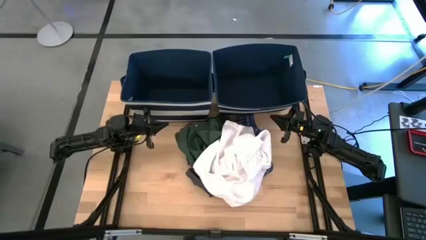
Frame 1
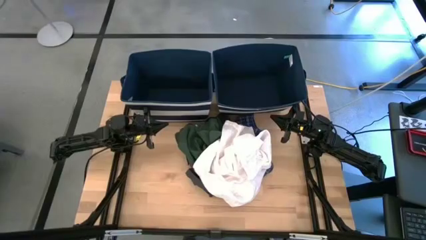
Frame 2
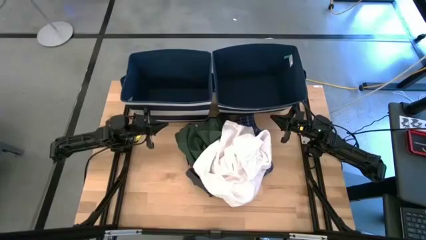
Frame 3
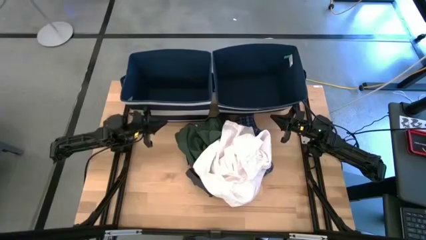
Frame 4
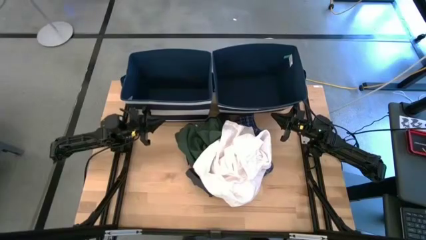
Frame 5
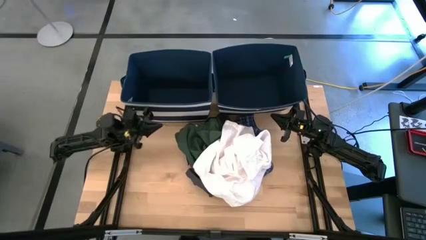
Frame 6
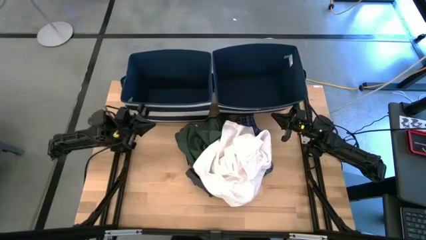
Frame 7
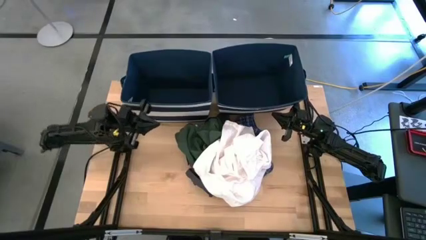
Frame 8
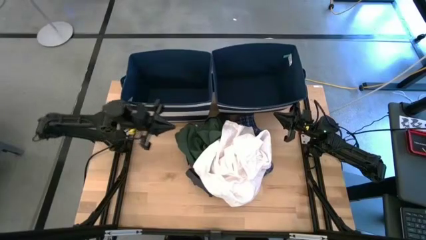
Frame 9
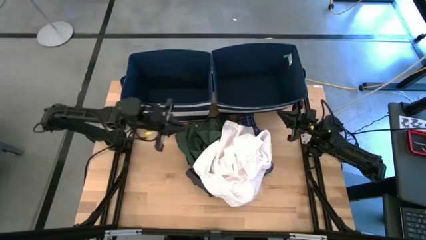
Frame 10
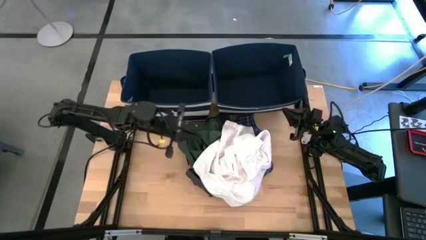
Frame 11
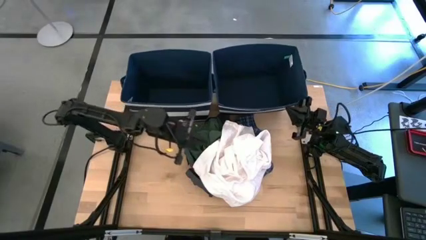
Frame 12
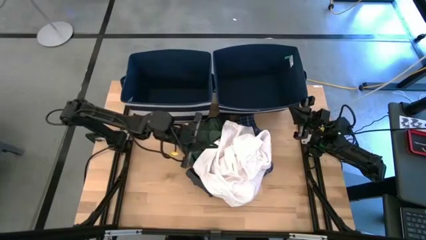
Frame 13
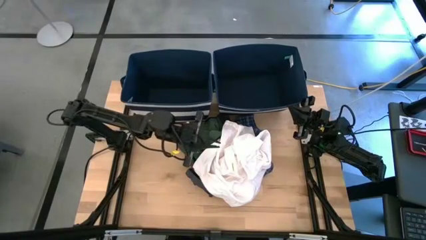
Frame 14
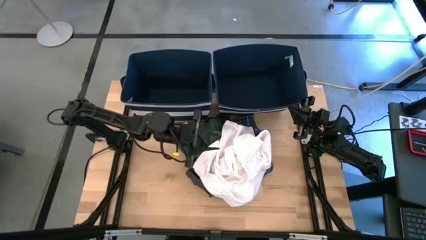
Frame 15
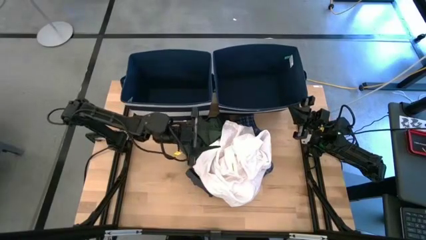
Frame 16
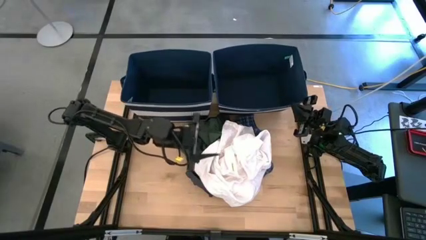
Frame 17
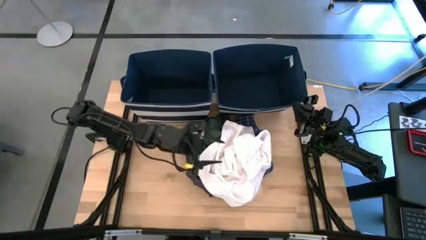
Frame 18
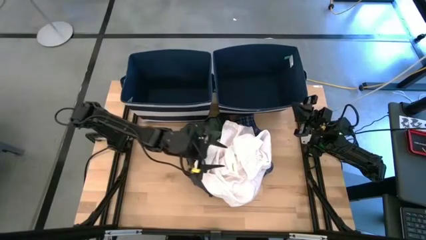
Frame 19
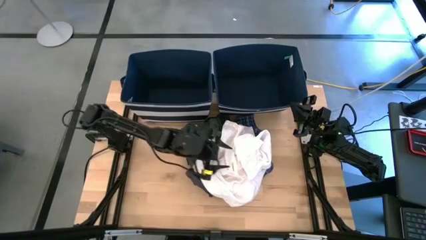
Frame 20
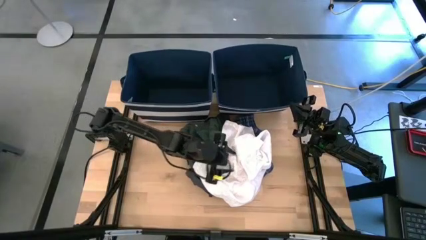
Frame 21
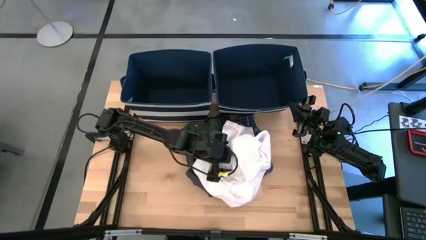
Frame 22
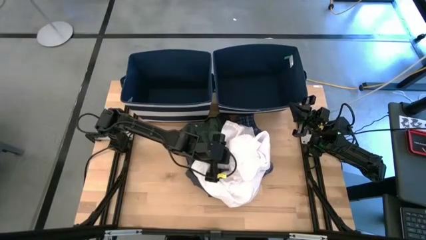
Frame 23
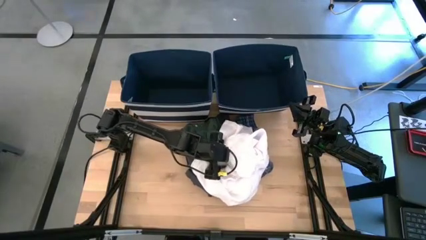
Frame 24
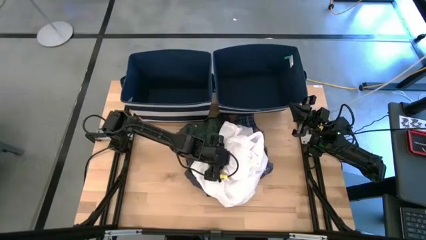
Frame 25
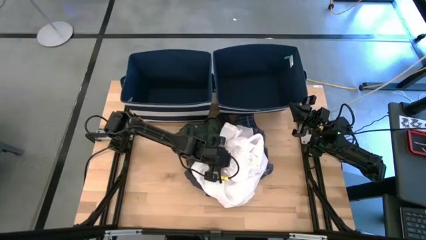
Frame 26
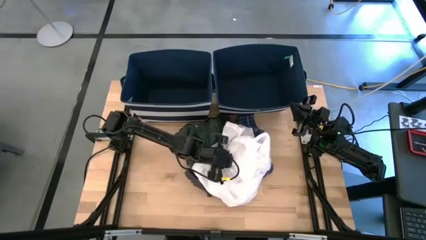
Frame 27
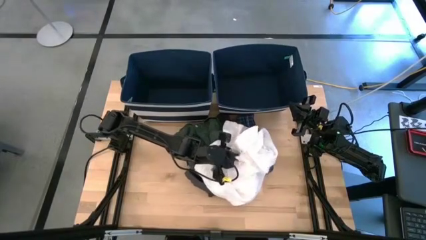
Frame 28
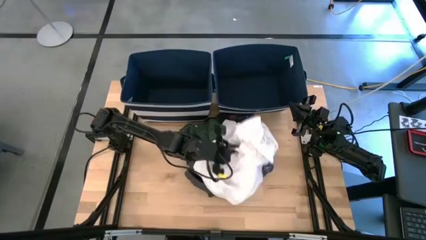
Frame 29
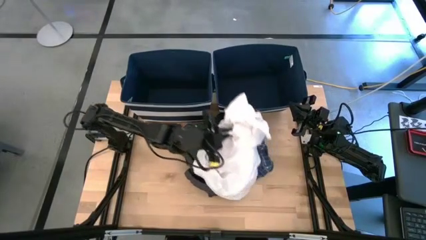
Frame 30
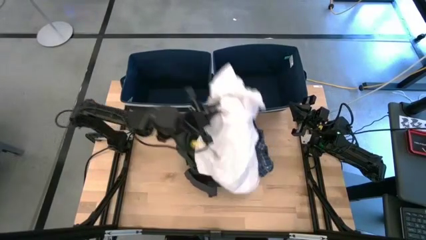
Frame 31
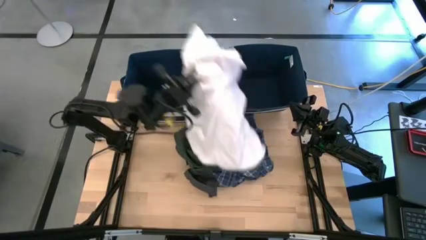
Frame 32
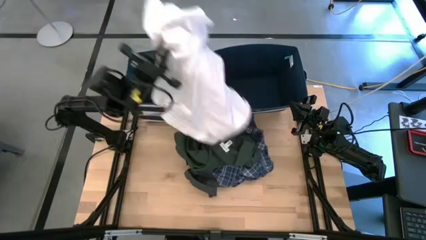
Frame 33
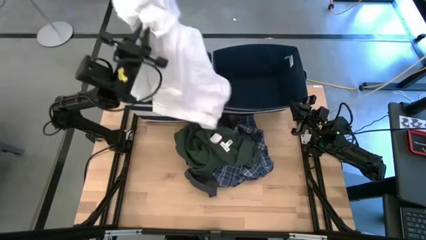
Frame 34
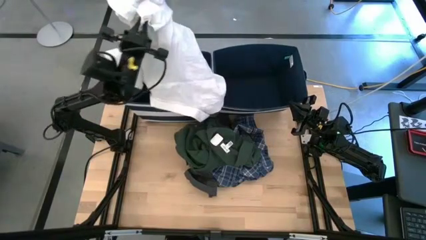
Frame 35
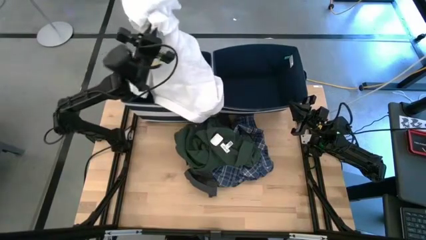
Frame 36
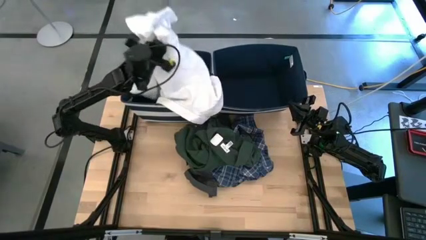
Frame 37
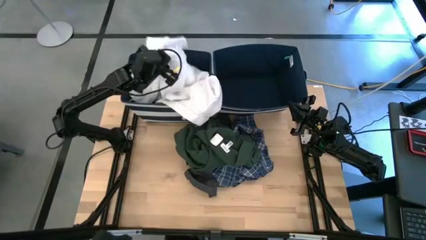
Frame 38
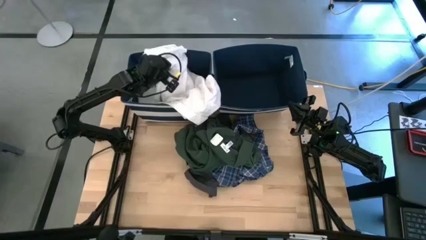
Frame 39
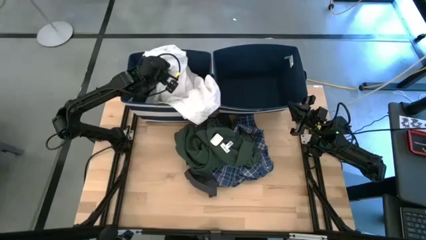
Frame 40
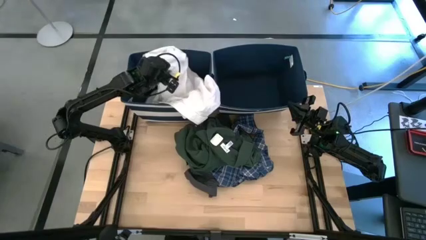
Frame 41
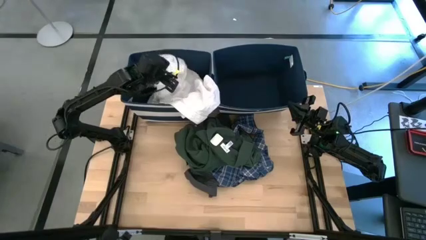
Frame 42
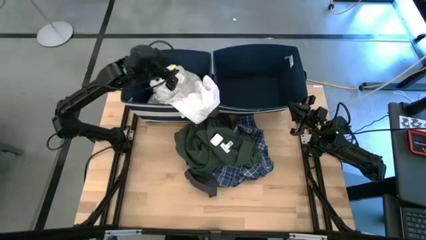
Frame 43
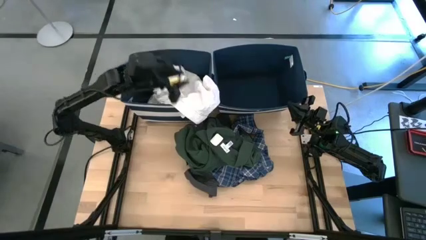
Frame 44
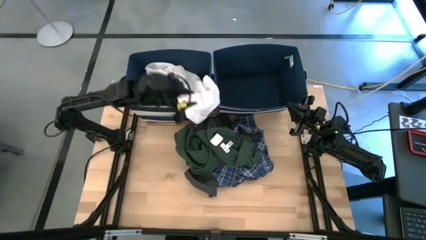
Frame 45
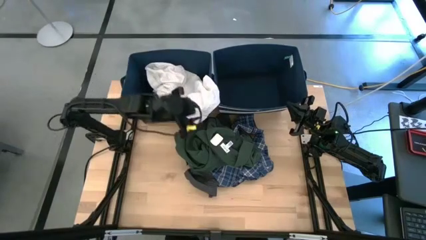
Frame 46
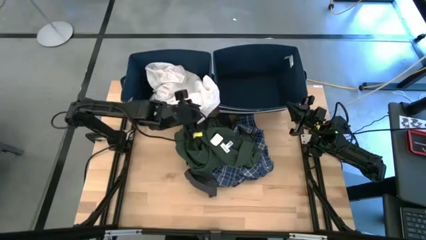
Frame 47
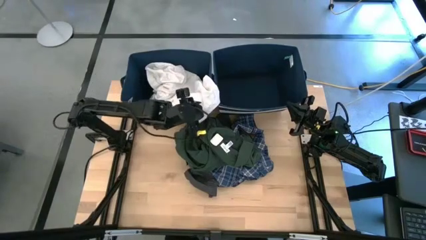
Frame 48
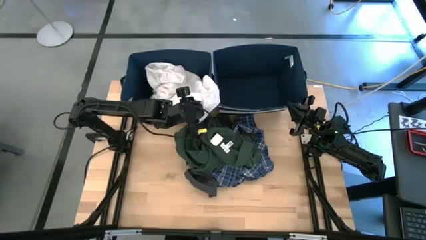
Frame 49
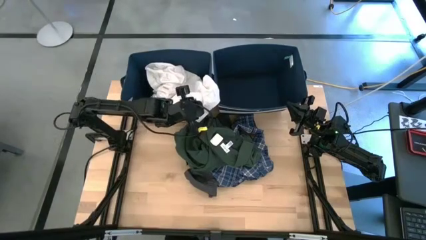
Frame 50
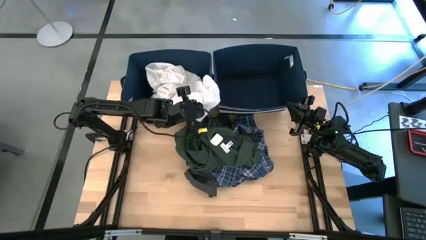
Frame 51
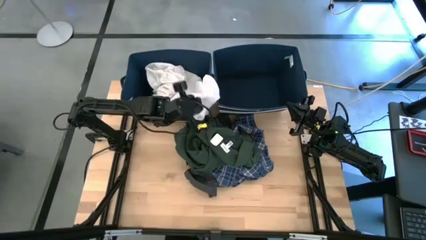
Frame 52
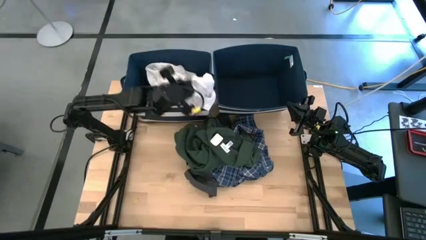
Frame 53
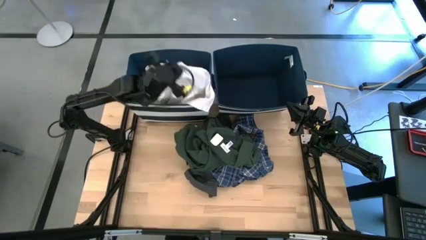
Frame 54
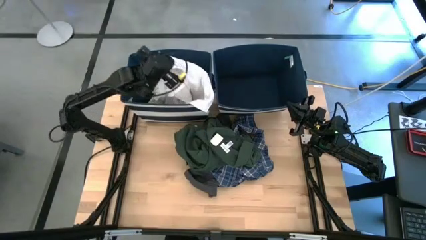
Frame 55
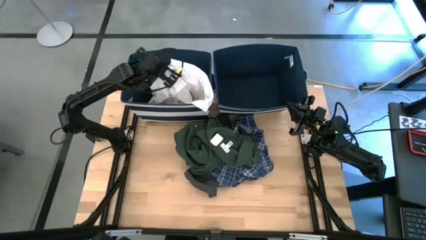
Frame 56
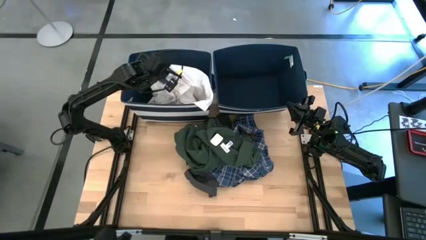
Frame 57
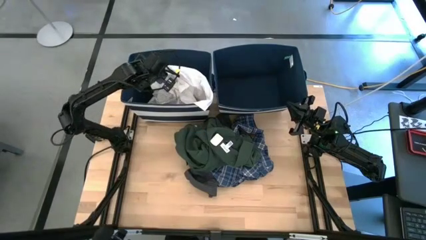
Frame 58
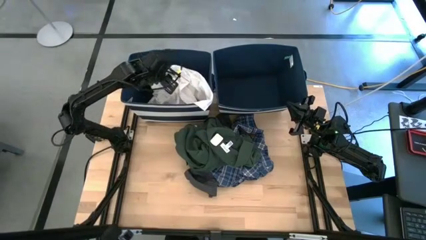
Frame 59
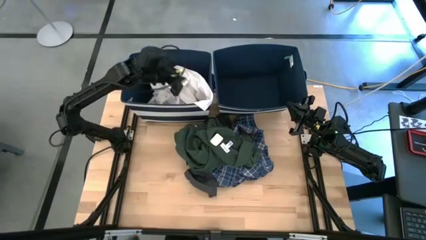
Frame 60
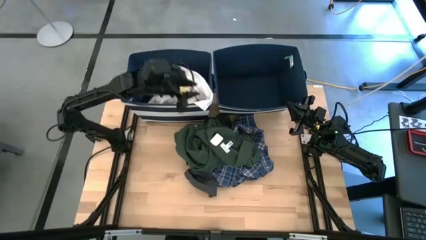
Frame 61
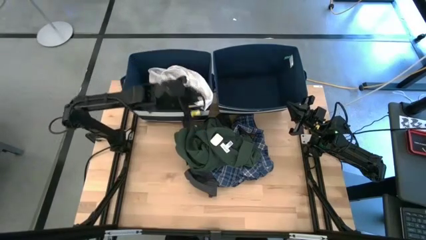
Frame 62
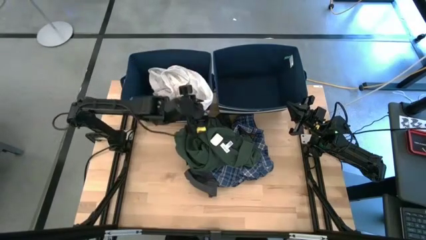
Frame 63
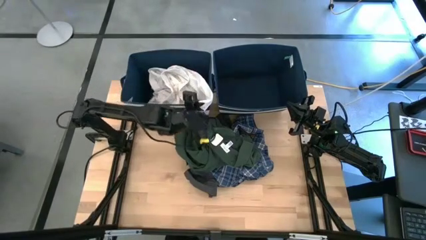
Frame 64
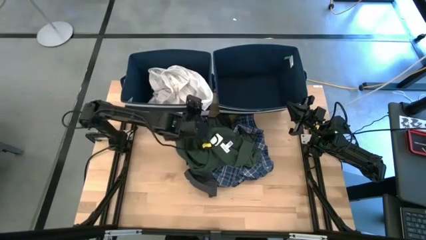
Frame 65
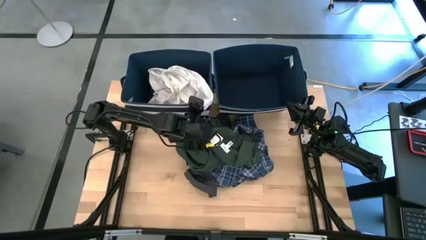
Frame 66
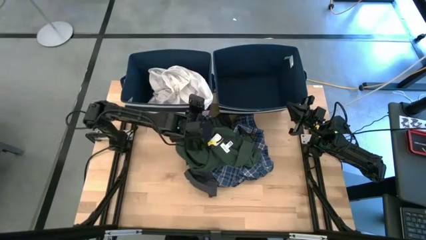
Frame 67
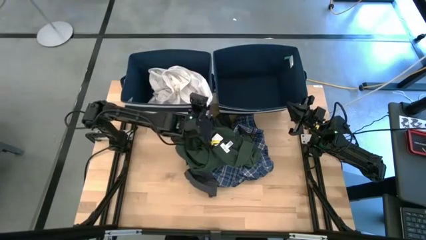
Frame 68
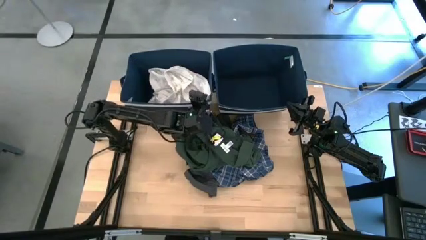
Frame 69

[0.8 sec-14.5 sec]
Task: Sort clothes
Put the white polo shirt into the left blue laundry basket
